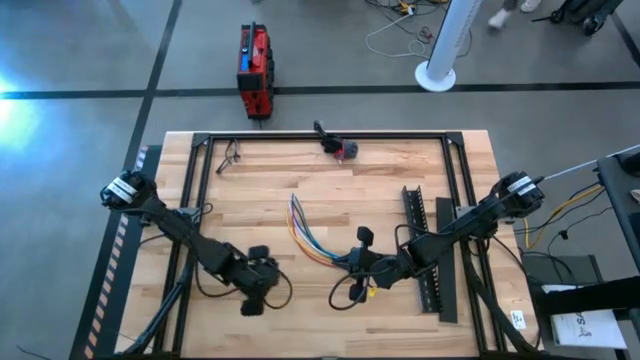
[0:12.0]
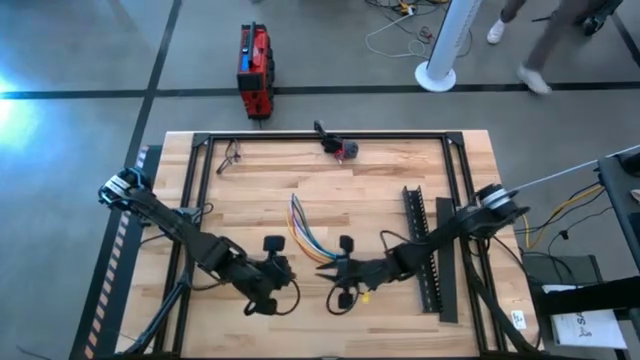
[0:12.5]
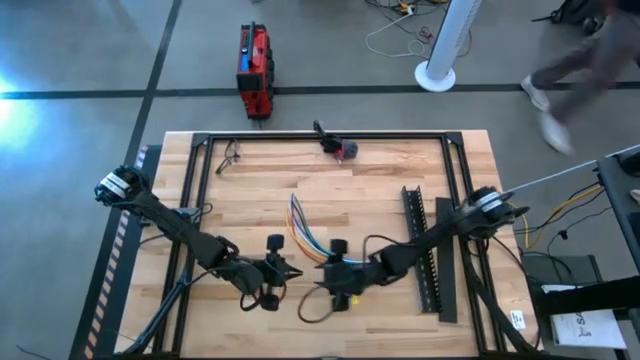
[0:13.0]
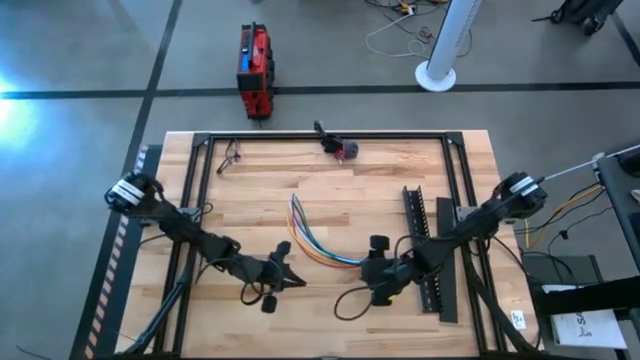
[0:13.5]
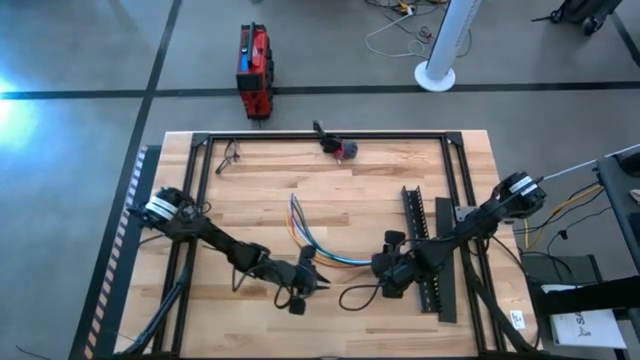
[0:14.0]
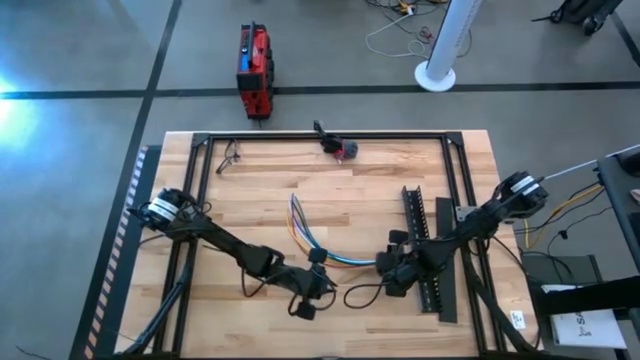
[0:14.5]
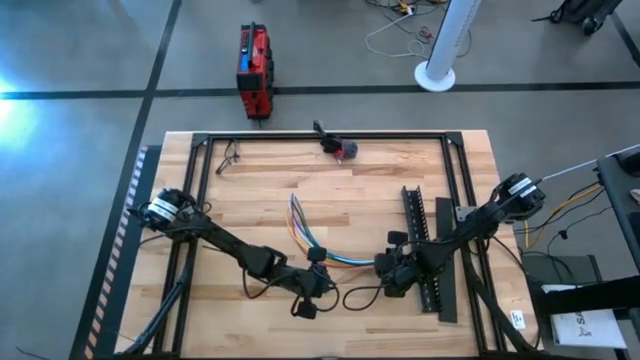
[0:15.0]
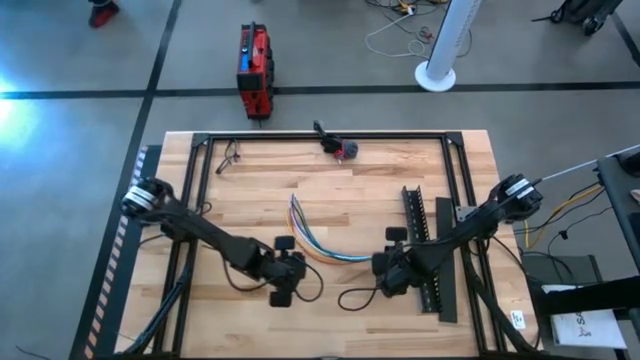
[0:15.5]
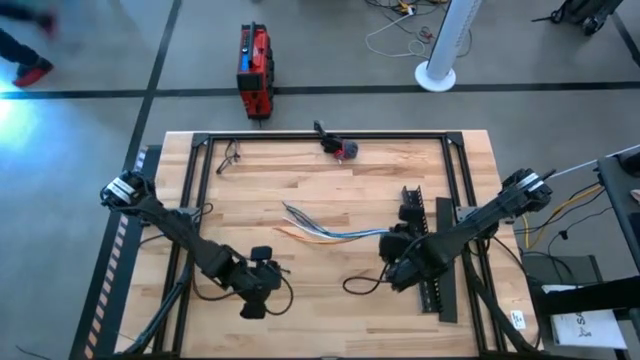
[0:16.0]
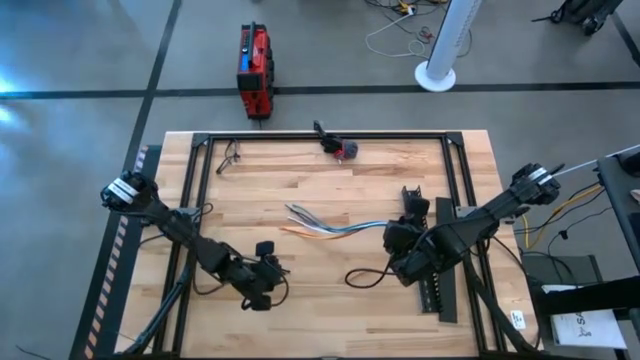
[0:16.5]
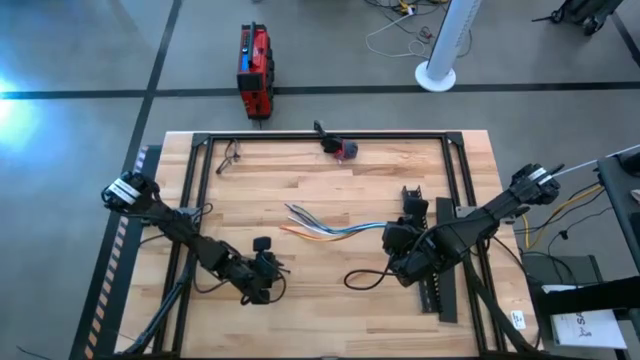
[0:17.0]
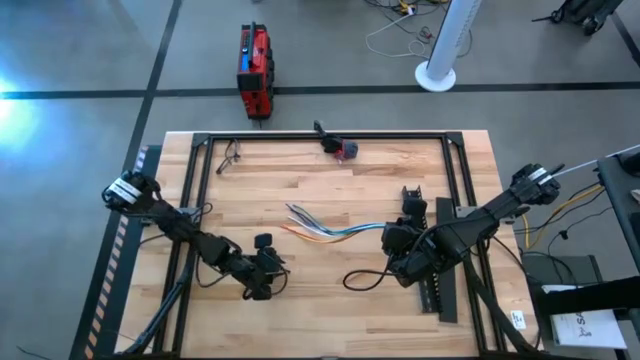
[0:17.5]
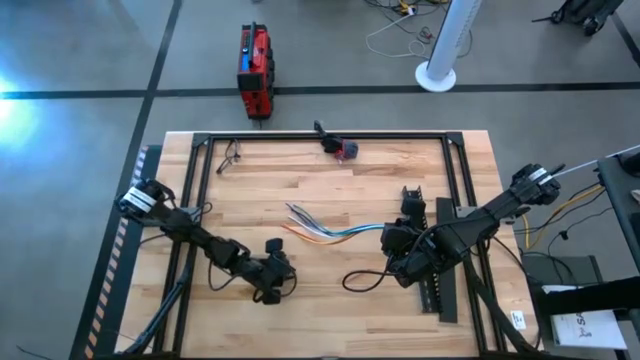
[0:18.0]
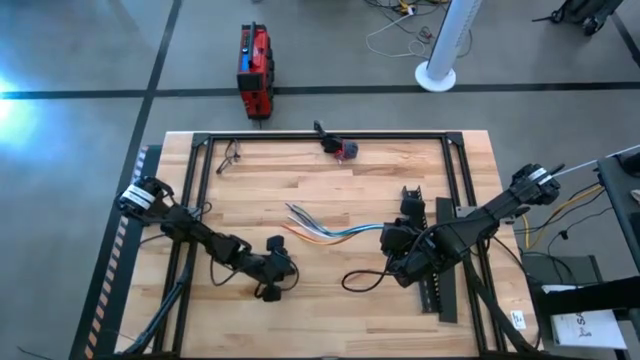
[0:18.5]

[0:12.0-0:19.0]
Task: Ziptie cables
Close the cables together using the zip tie

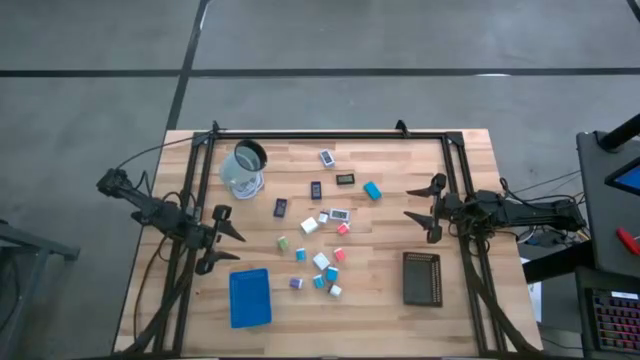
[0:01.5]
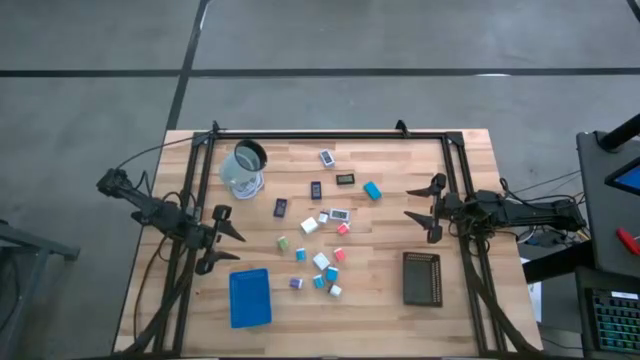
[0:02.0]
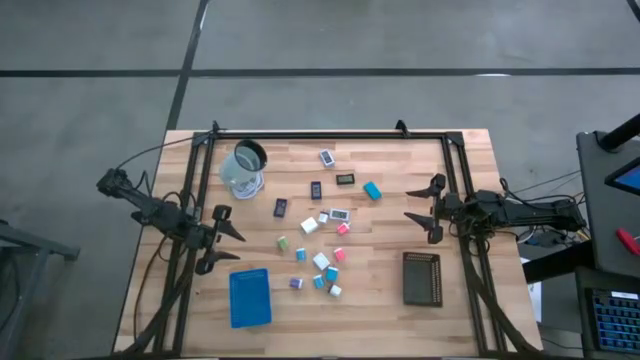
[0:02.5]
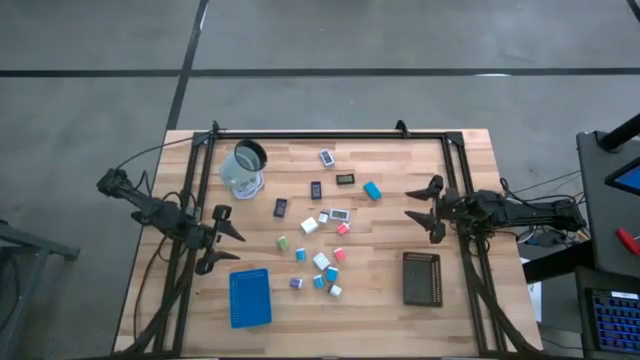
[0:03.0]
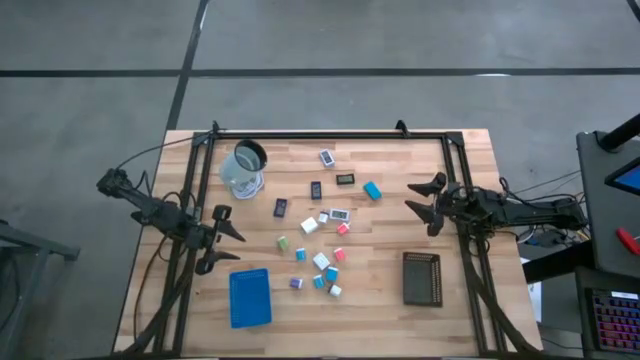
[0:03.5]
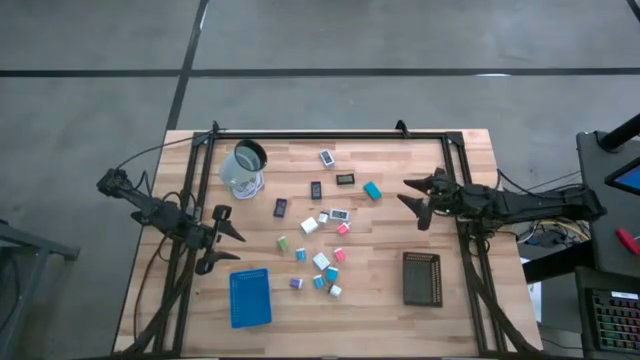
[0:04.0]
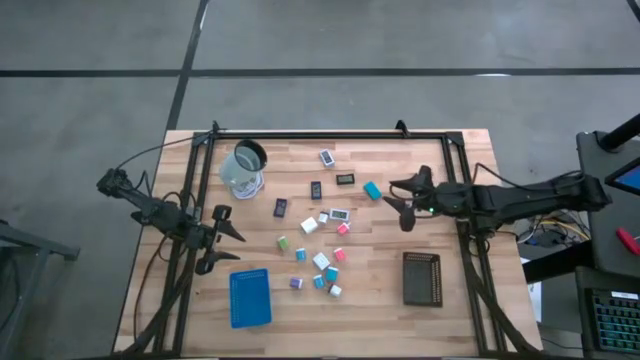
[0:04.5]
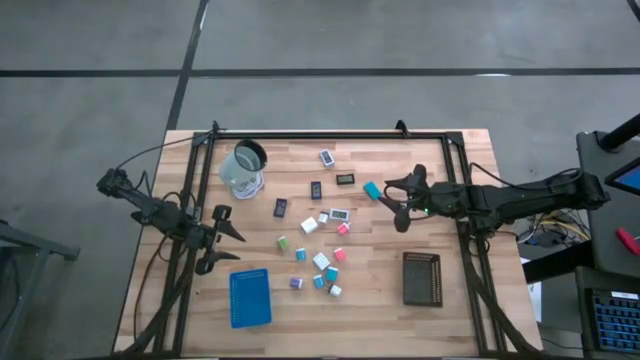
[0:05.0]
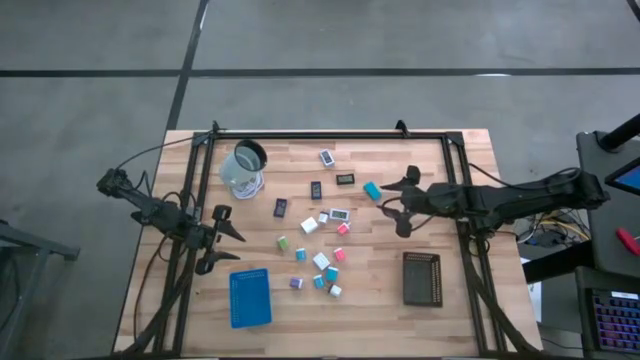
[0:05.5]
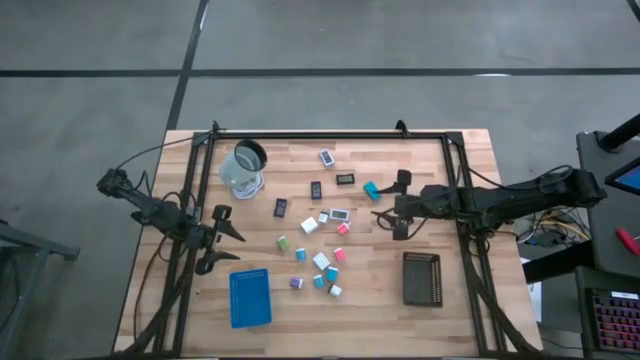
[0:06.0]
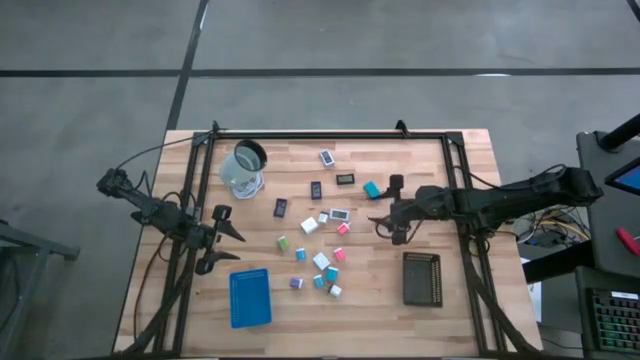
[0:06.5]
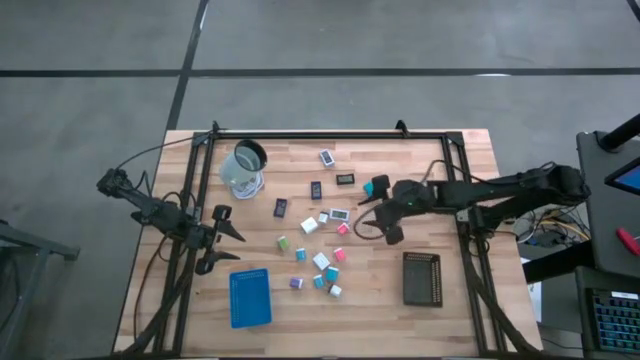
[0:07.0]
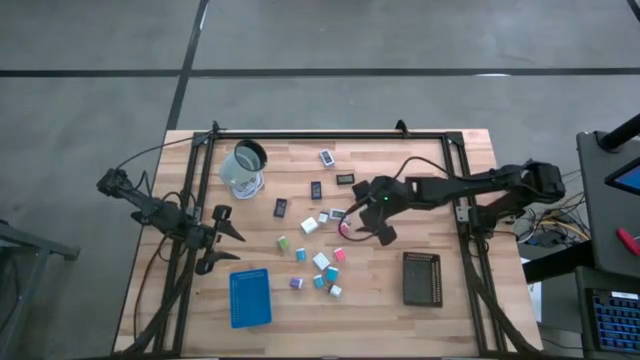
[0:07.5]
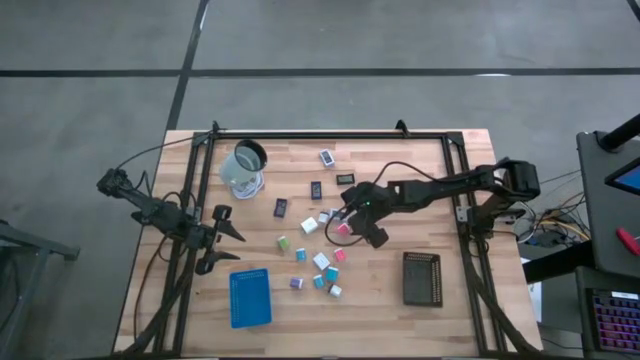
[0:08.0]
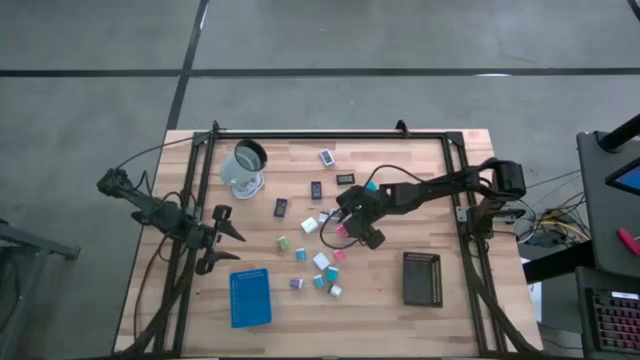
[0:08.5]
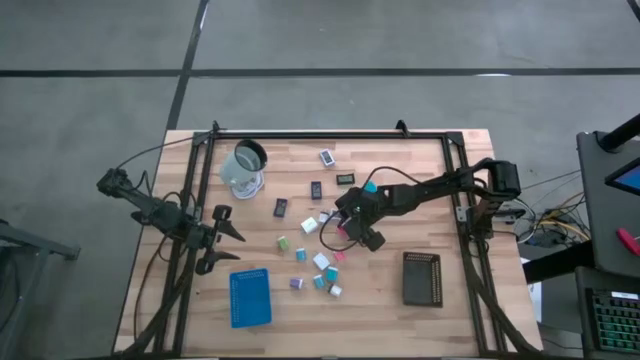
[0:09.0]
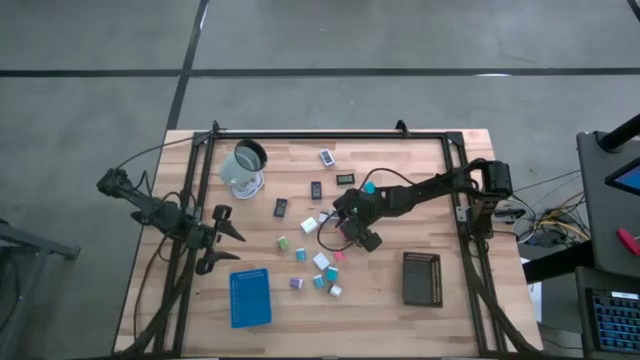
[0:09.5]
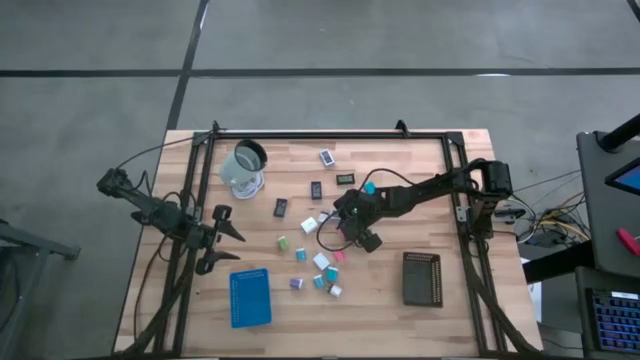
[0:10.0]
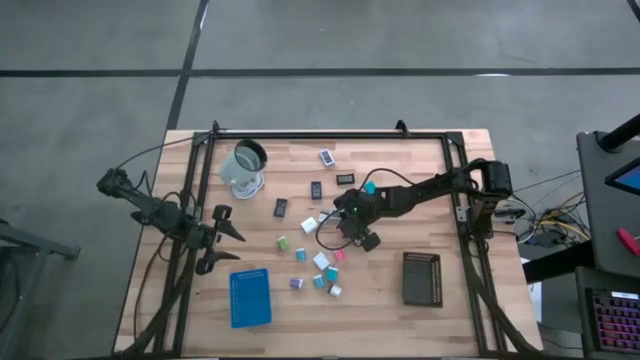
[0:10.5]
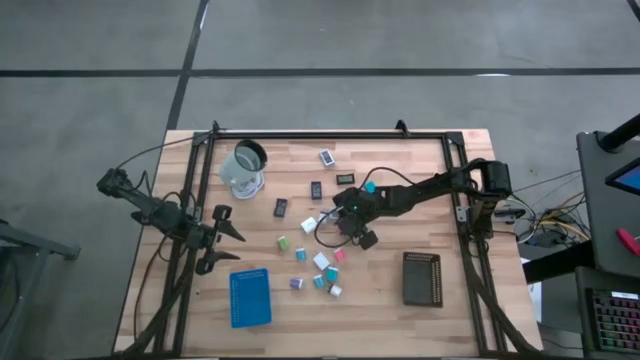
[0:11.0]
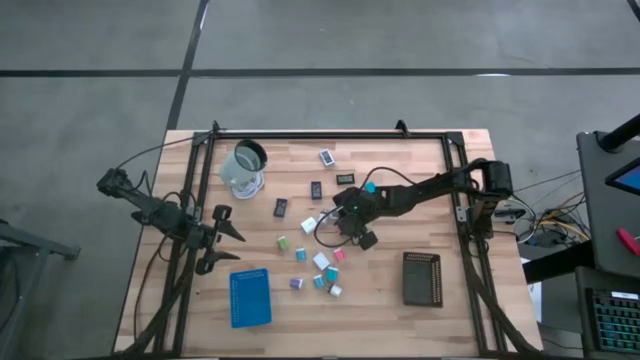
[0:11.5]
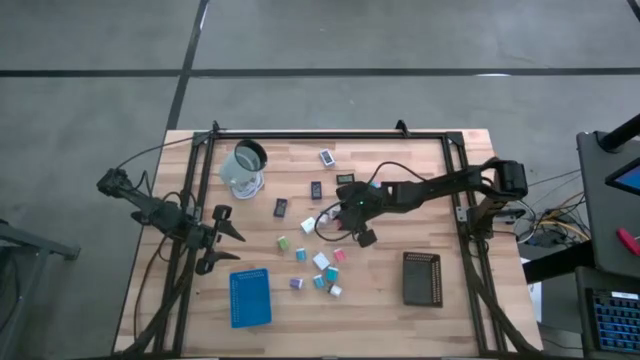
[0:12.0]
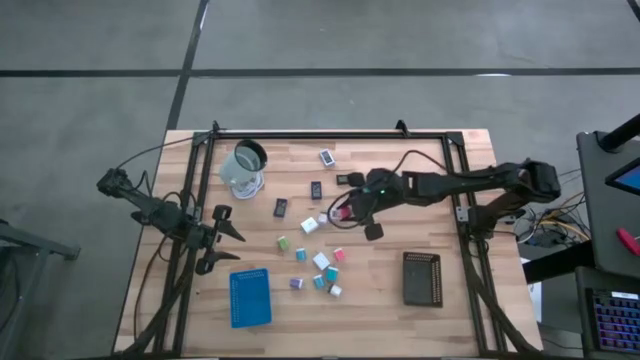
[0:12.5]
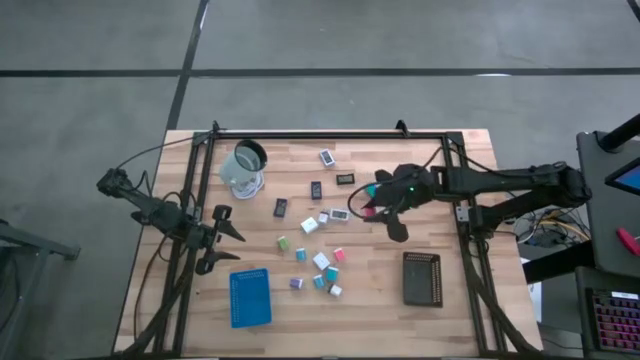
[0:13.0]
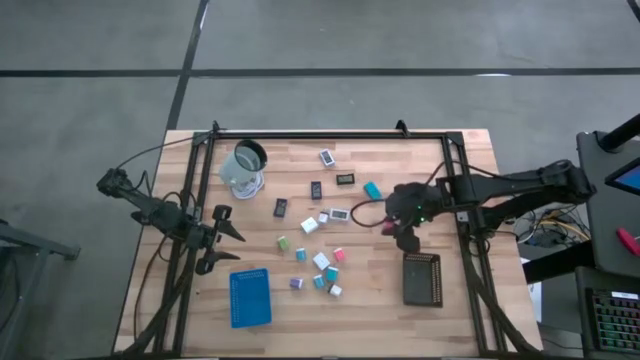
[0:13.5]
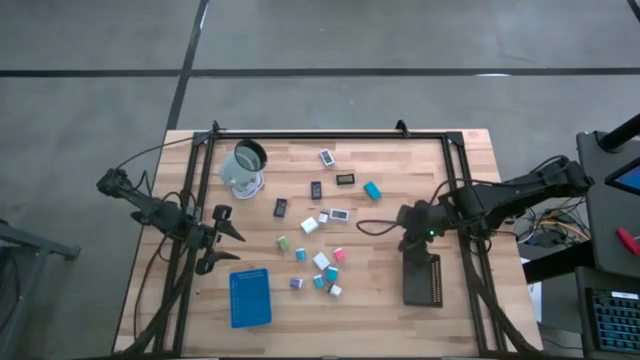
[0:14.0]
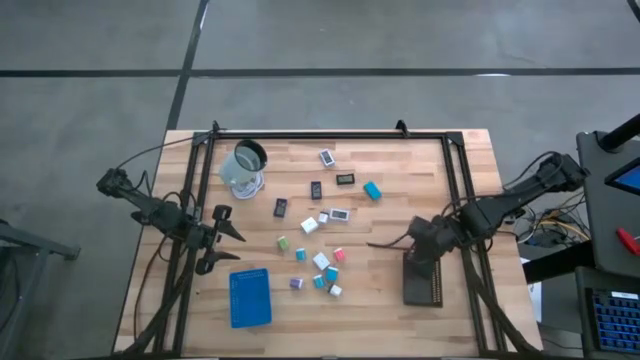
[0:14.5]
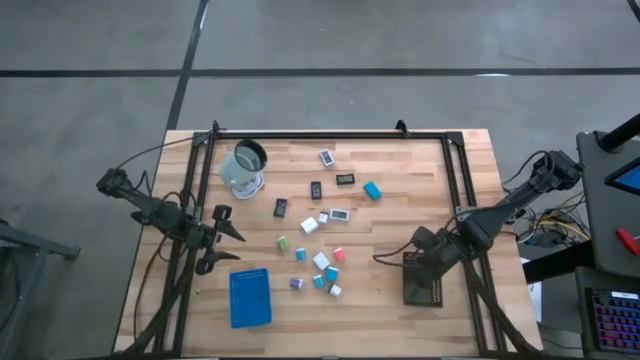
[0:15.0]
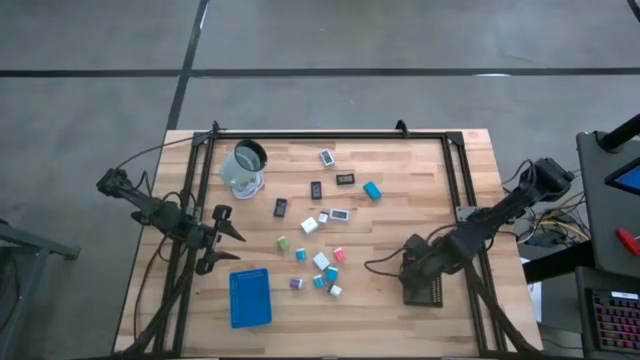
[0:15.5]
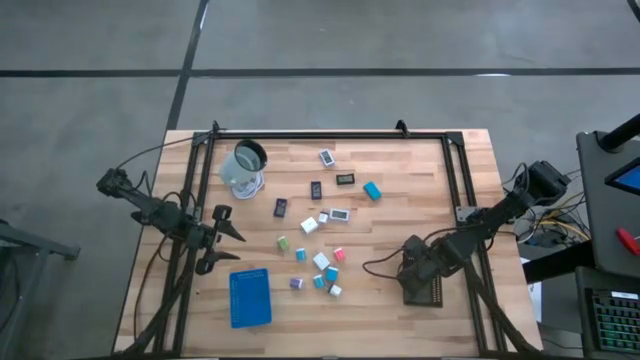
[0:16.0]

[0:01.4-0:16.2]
Task: Pick & Place Office items
Put the top pink charger adapter into the black bin
